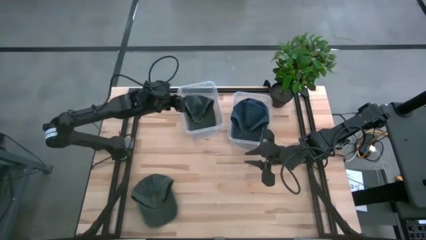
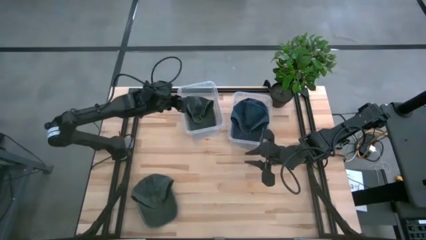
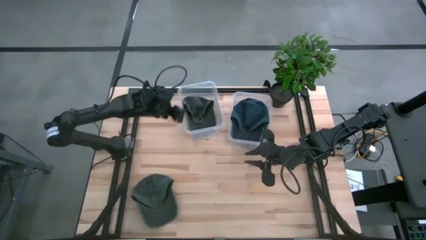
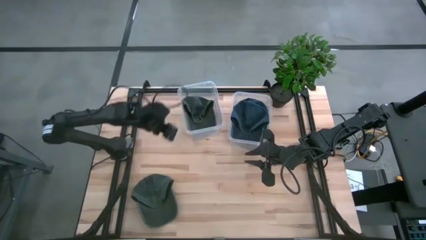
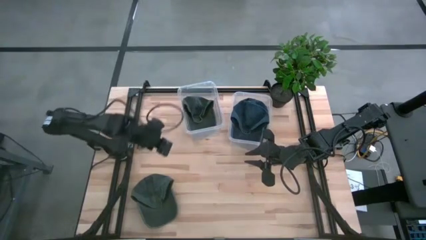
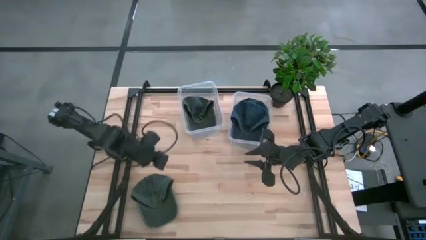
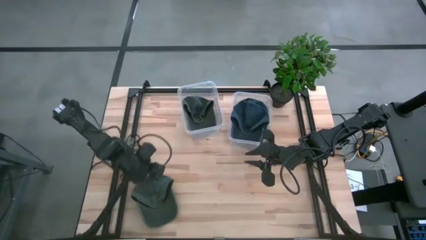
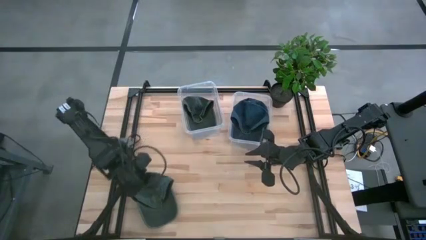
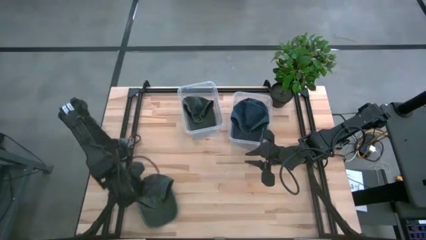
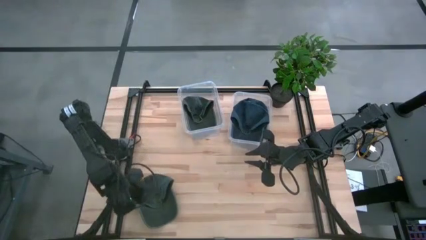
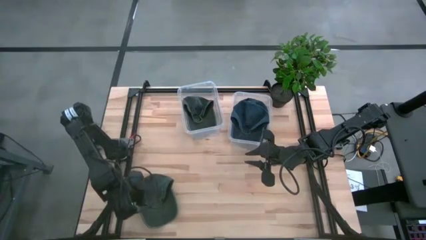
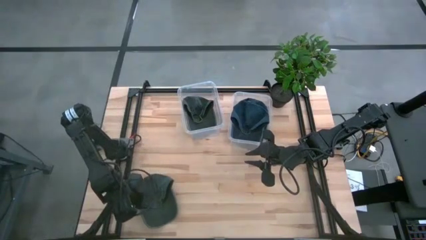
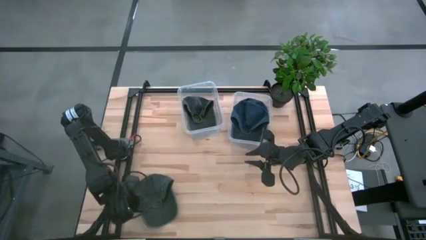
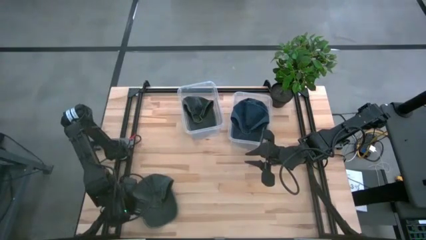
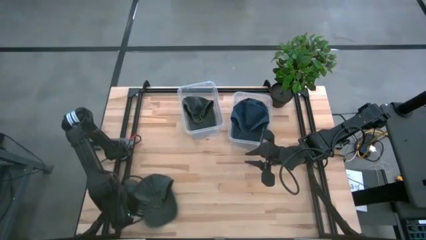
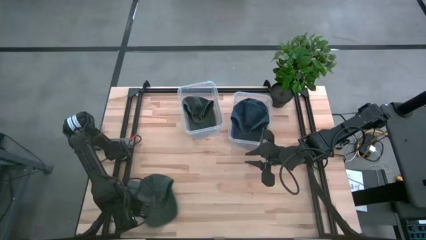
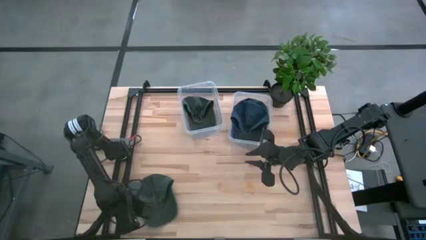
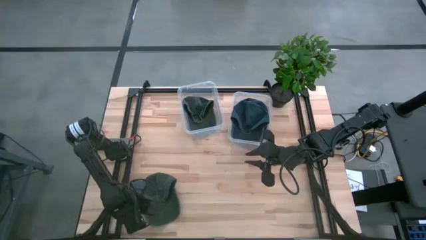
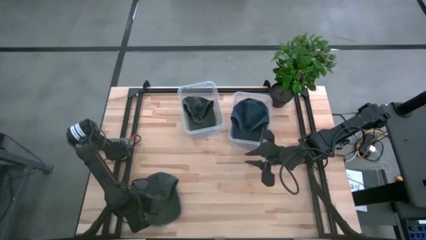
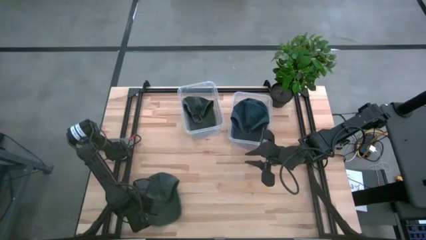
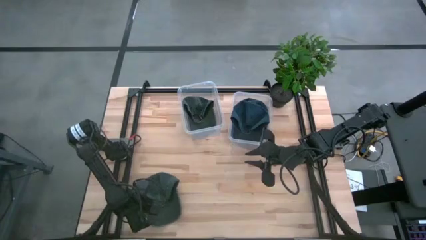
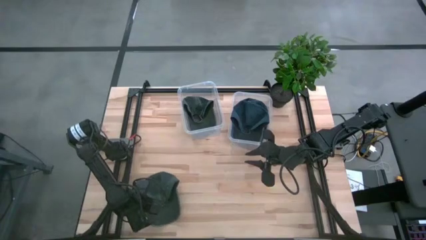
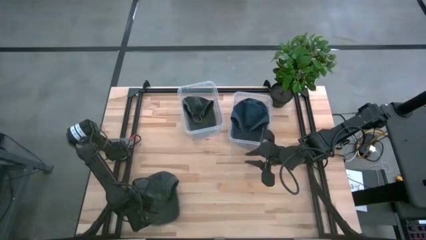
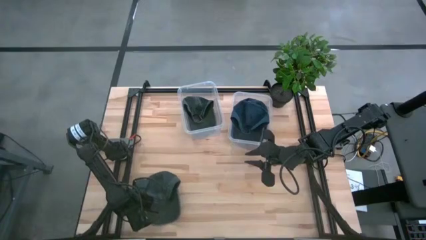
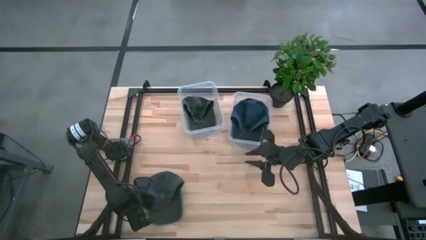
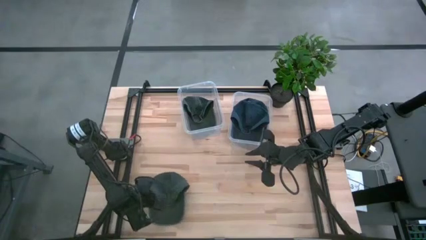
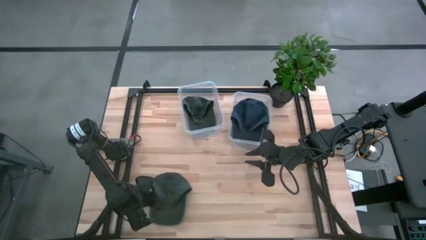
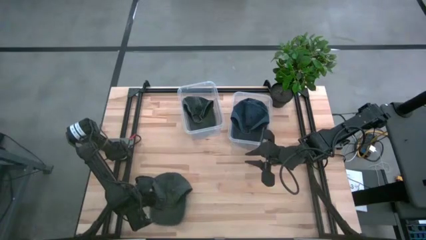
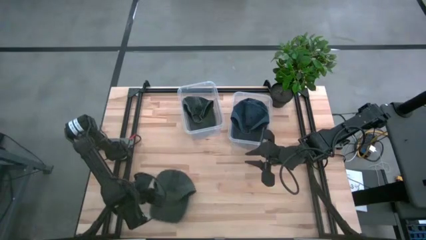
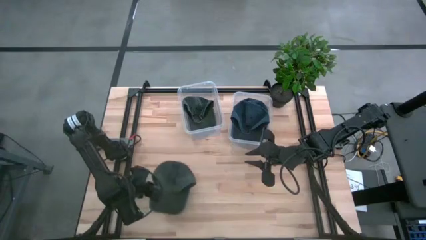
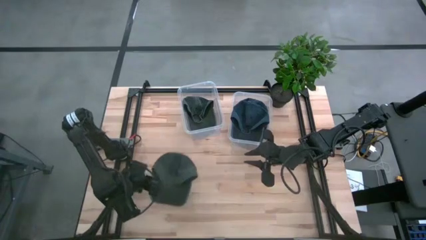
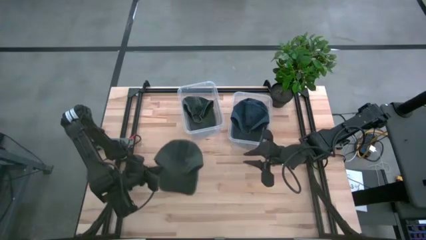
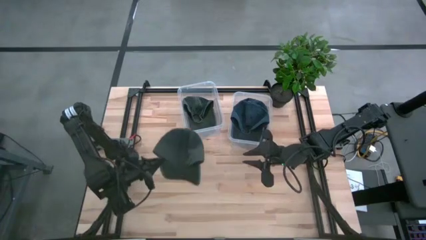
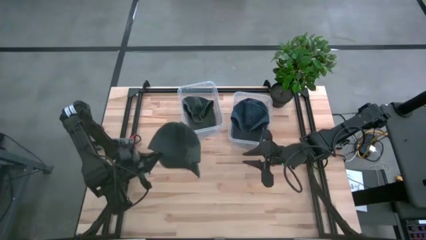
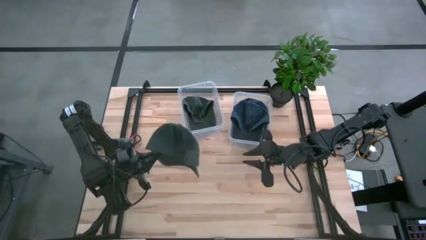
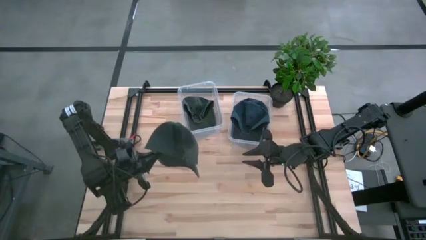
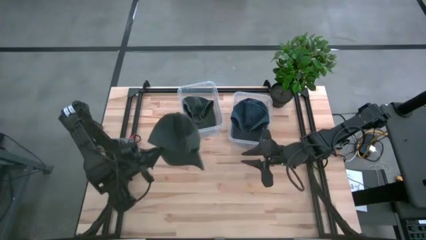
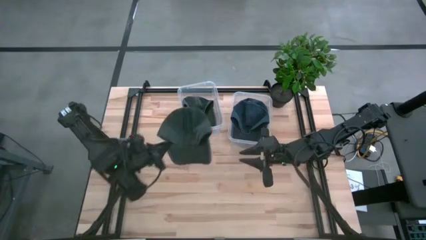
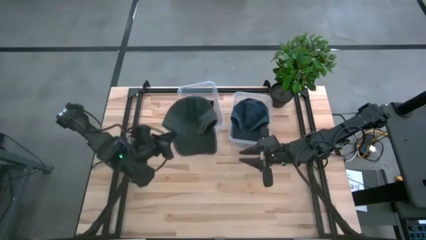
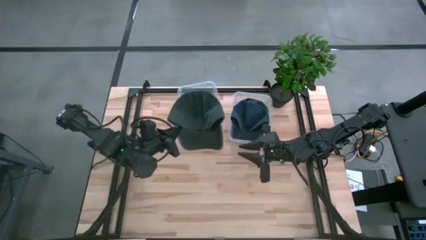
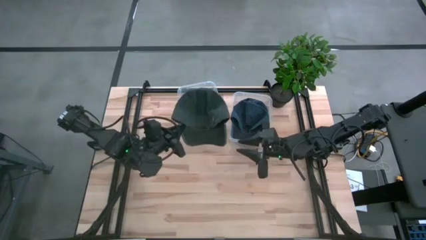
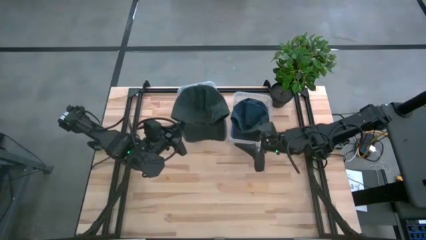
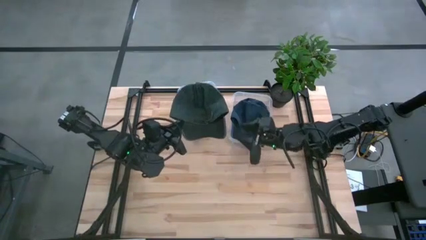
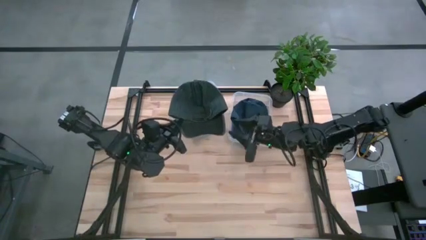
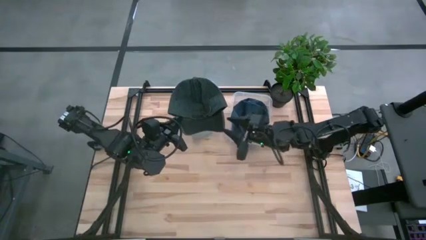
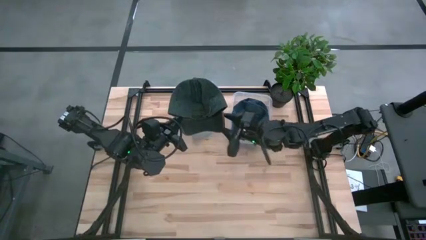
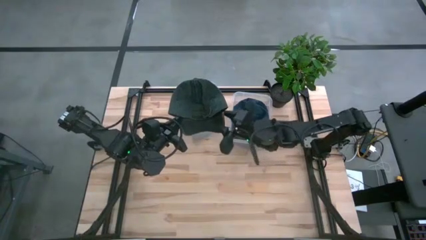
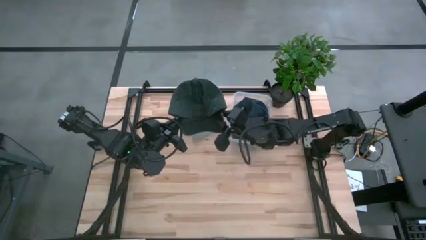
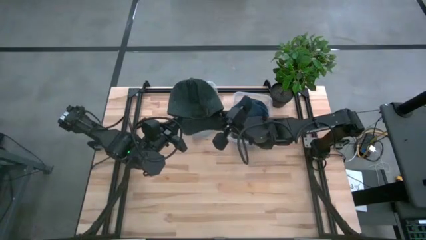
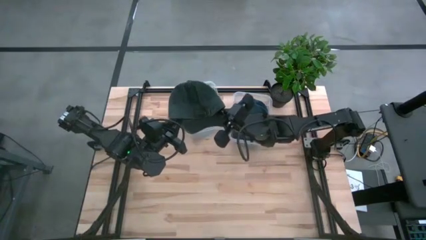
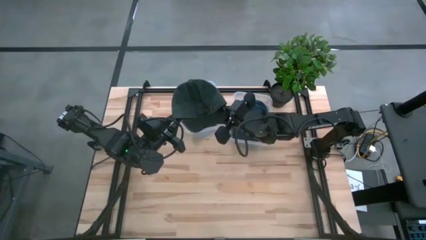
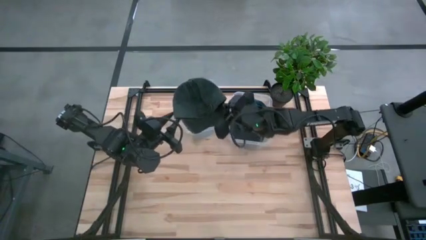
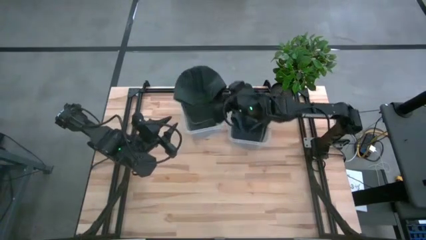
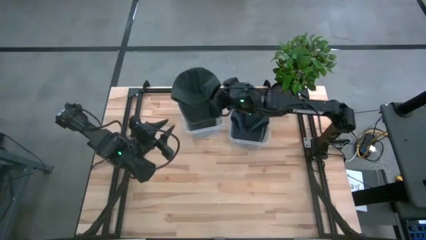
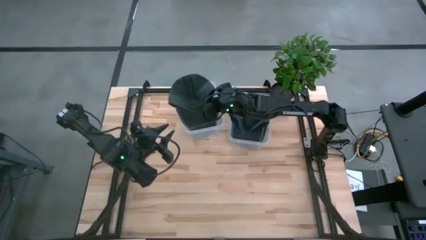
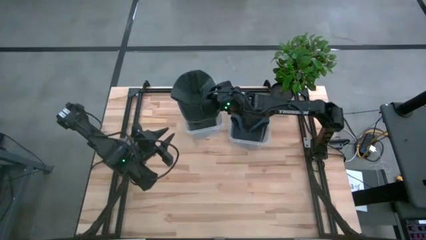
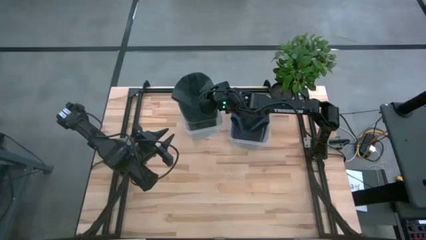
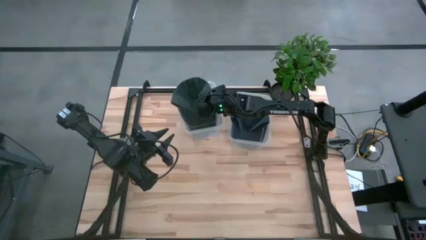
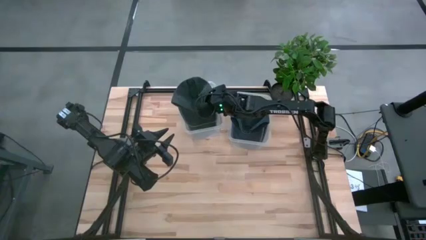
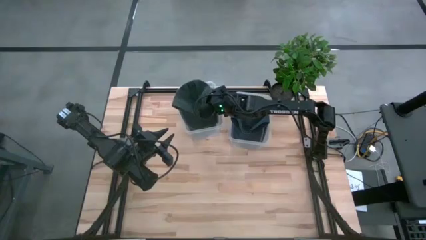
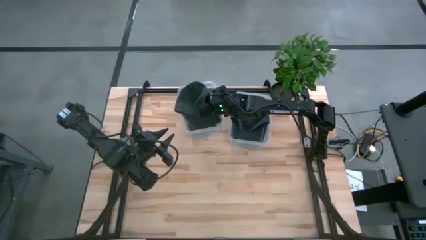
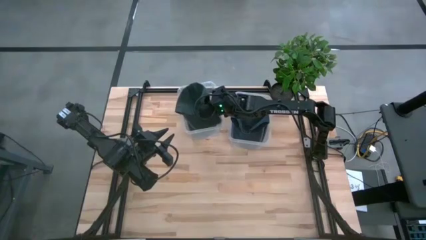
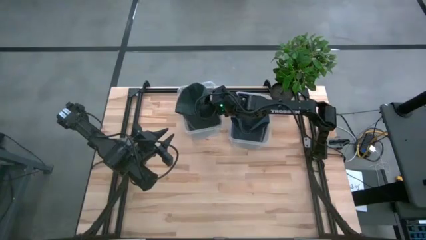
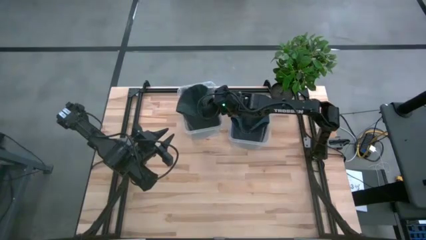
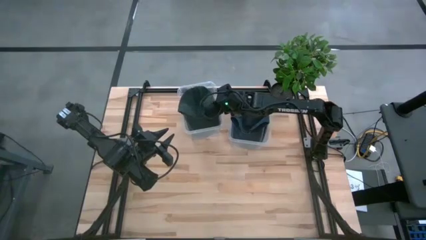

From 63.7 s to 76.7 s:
Task: Pick & Place hat
Put the green cap into the left transparent bin

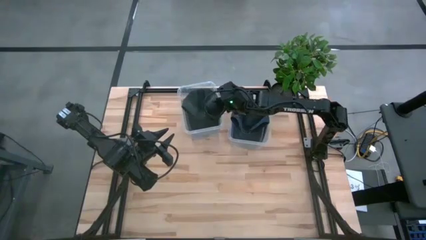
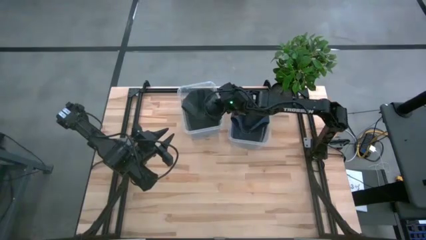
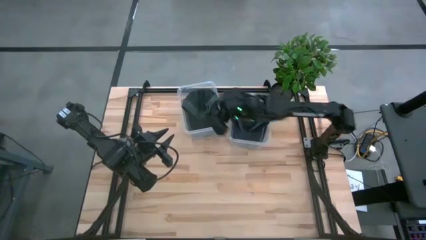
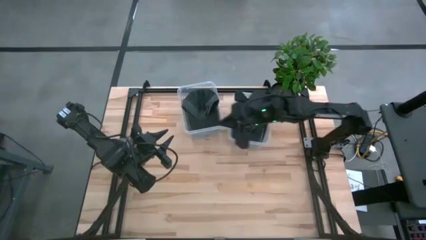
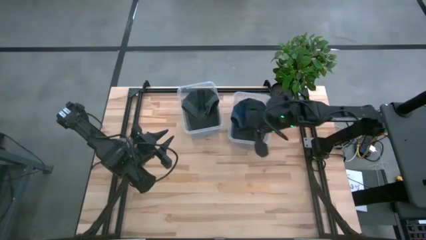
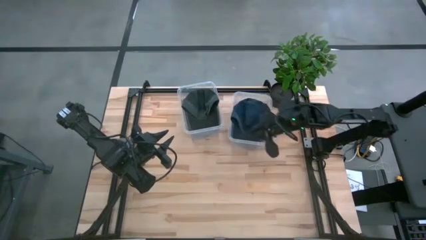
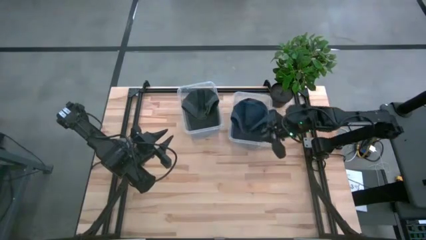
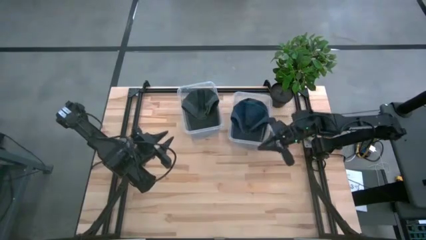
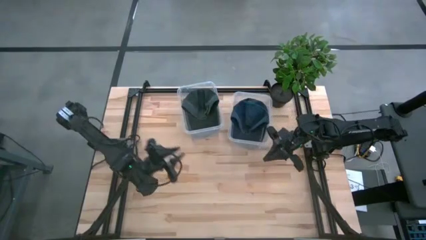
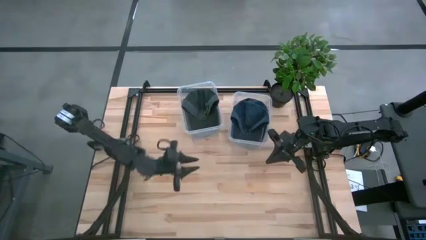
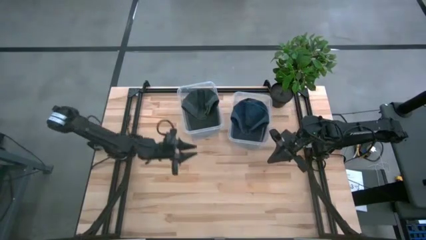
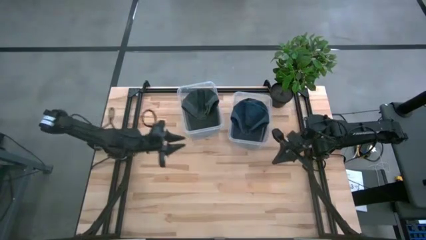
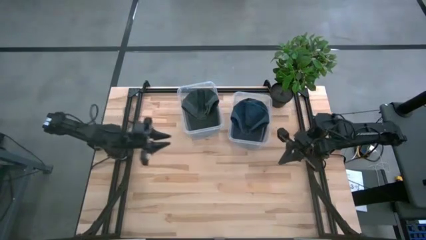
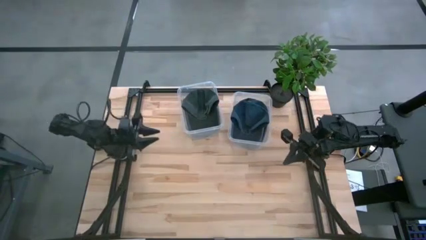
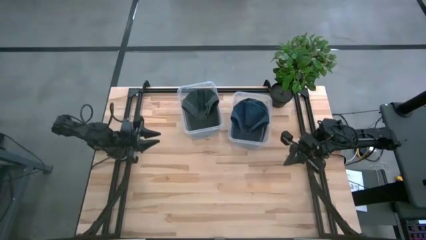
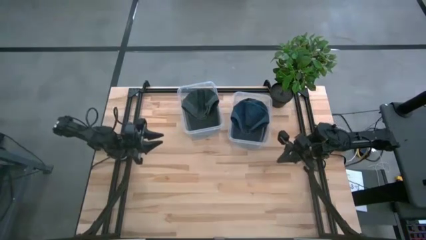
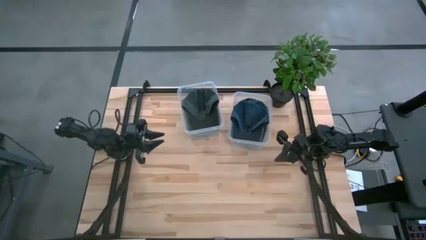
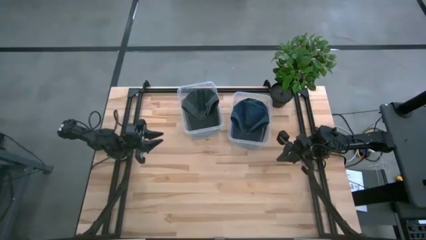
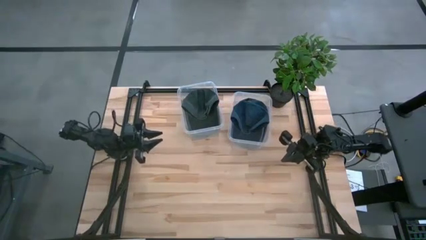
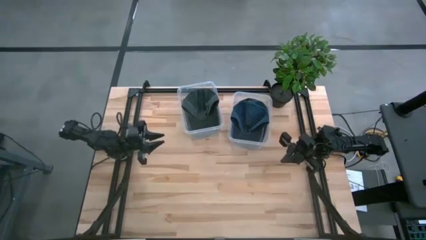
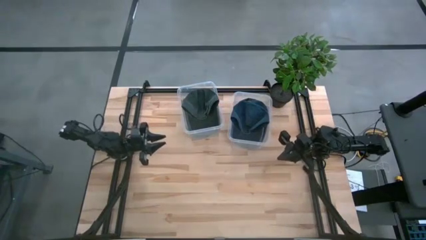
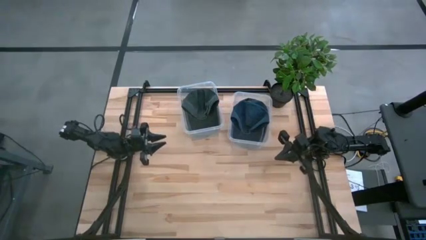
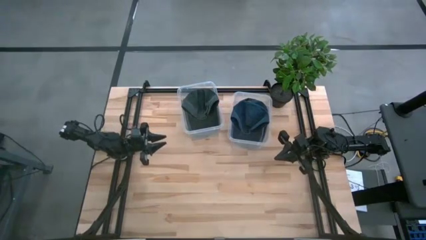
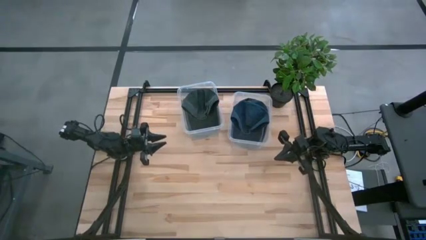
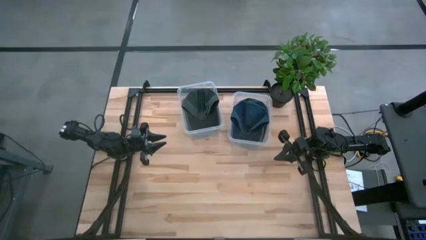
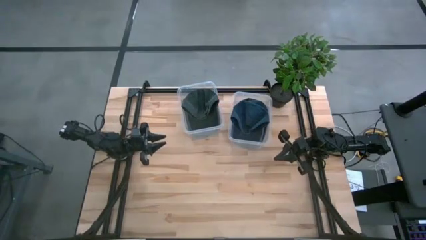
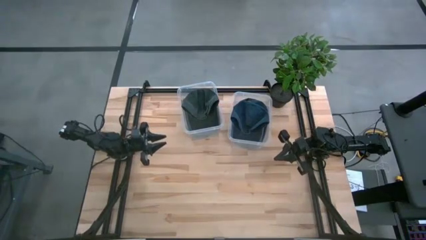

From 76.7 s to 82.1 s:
Return to Home Position
